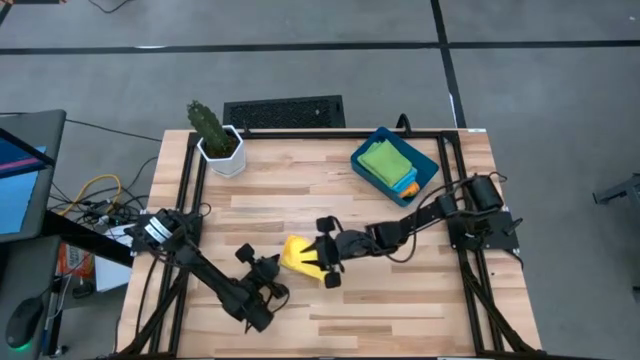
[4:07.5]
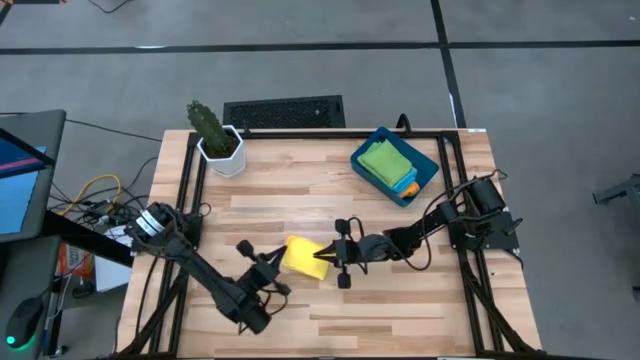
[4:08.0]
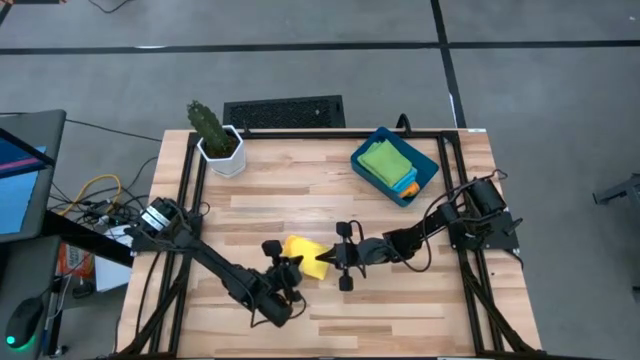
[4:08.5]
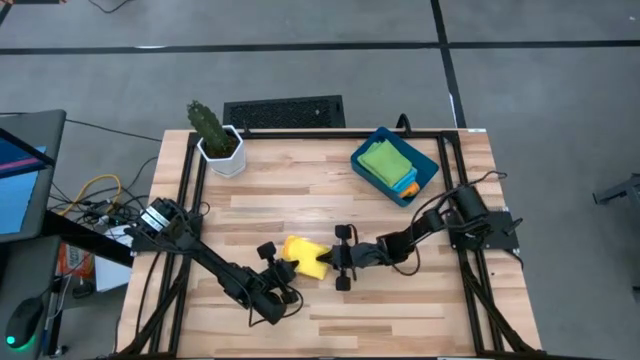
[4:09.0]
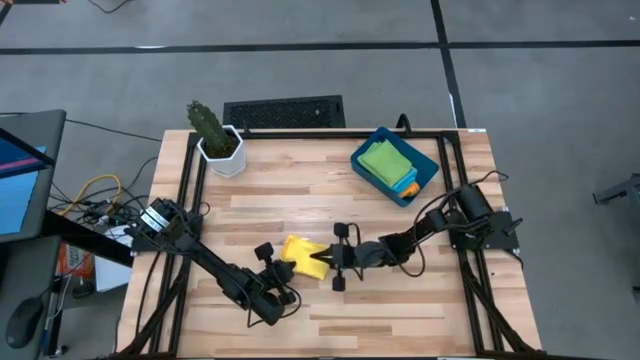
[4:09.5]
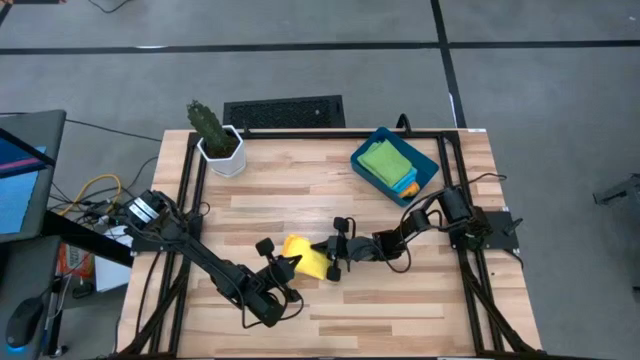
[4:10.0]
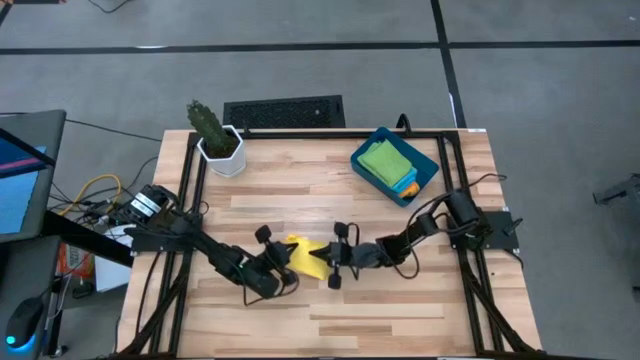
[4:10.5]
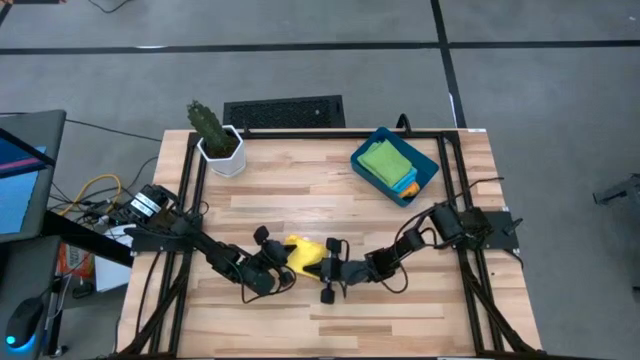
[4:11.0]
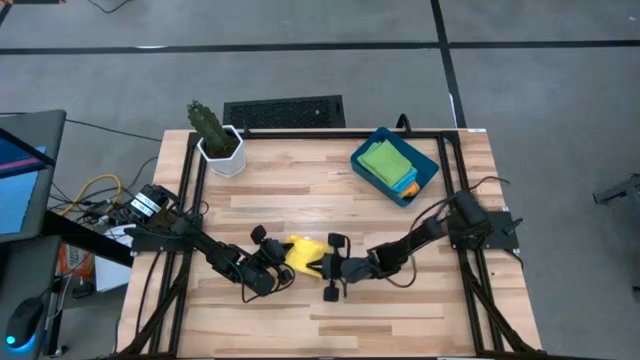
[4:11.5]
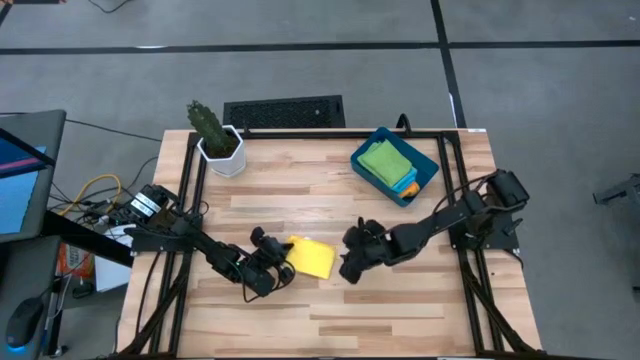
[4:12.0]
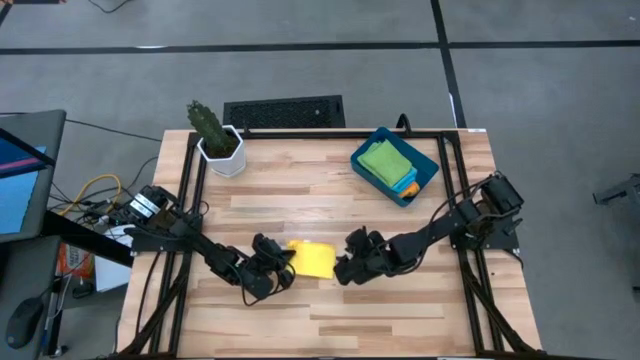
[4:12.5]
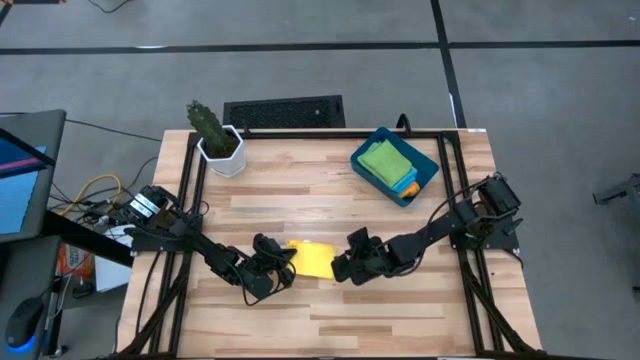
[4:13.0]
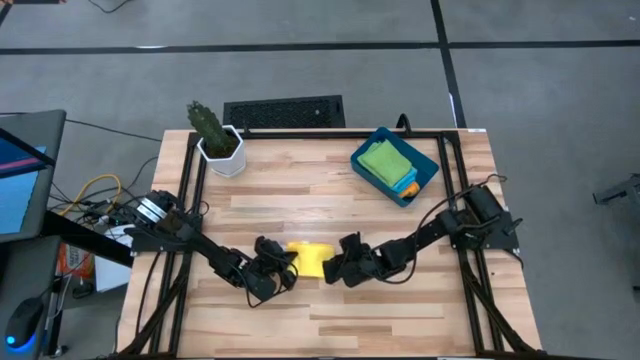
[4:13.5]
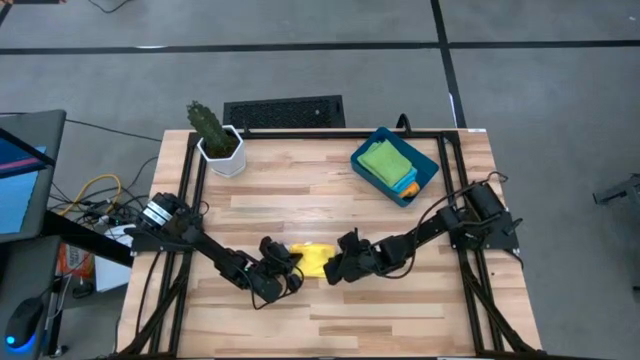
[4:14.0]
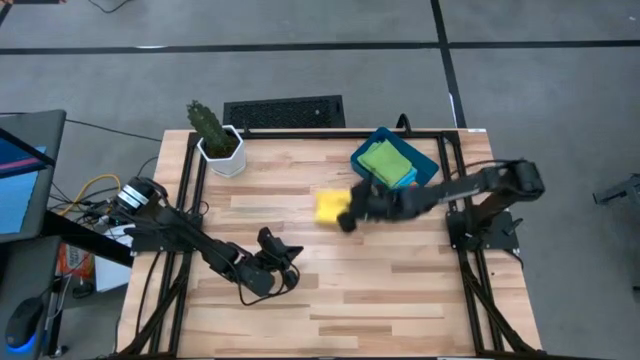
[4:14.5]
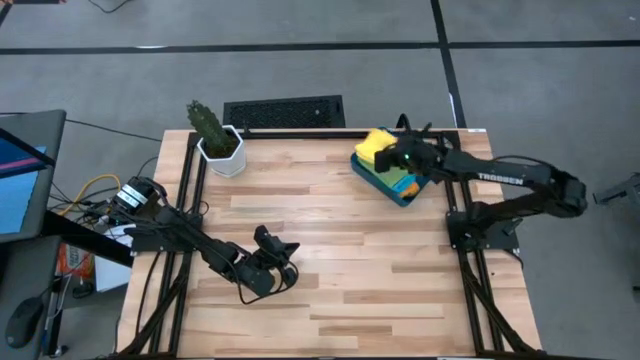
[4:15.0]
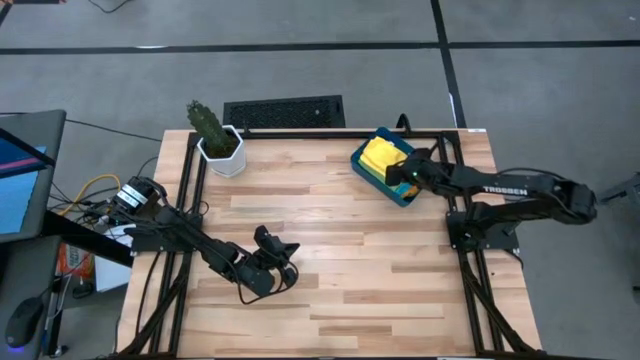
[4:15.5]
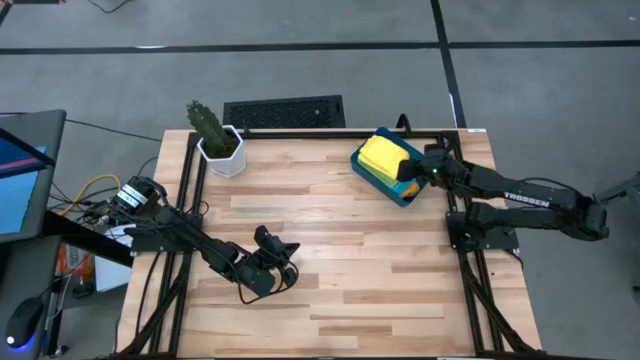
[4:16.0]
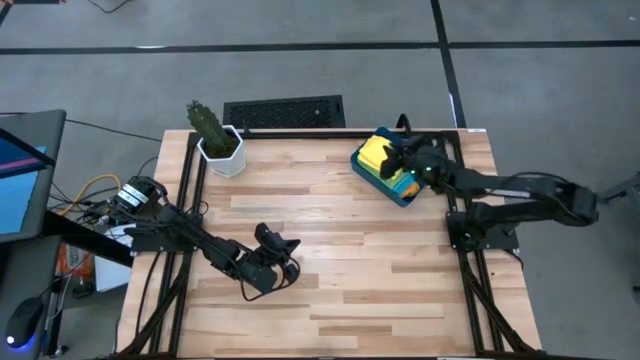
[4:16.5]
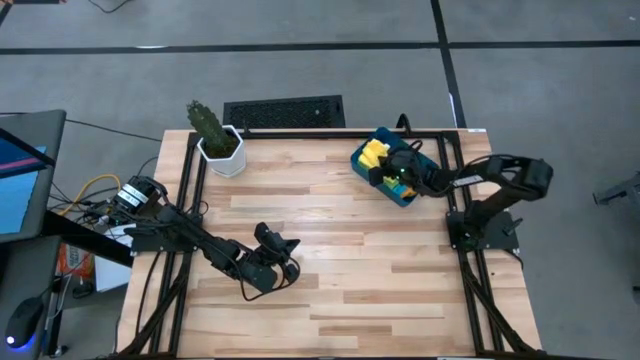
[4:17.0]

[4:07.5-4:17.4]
Task: Fold microfiber towels
Put the folded yellow microfiber towel into the blue bin

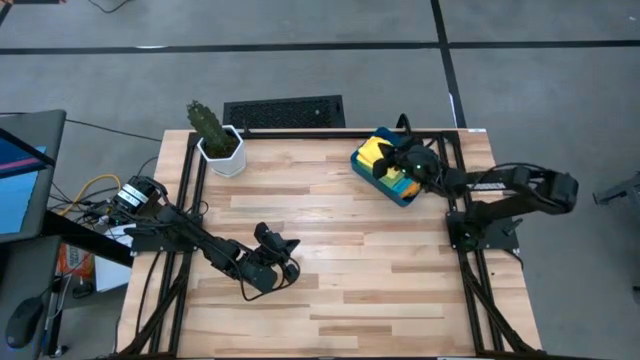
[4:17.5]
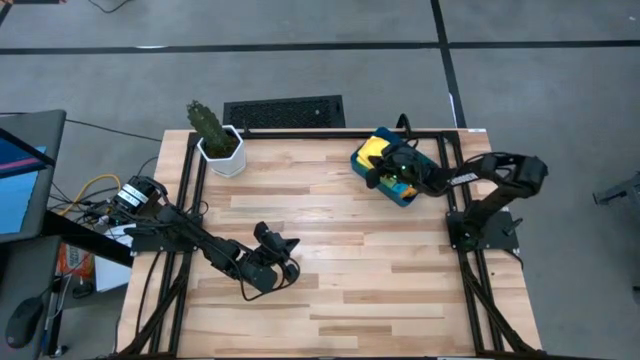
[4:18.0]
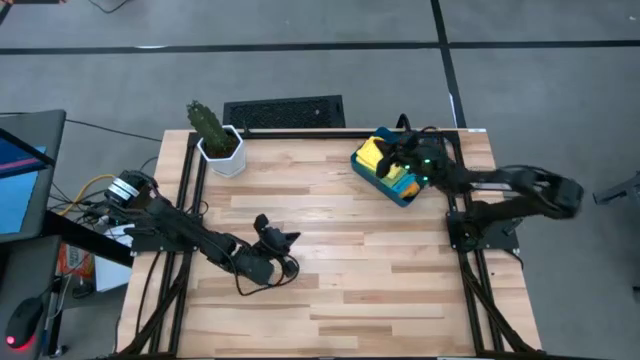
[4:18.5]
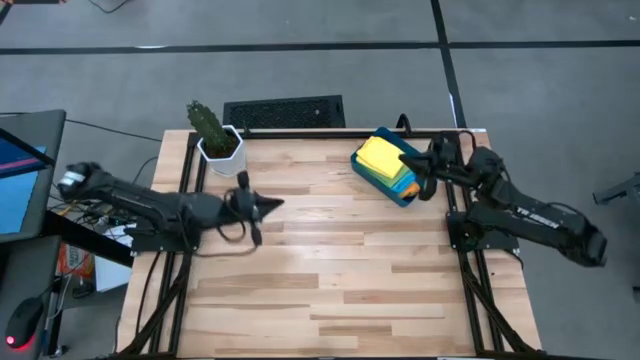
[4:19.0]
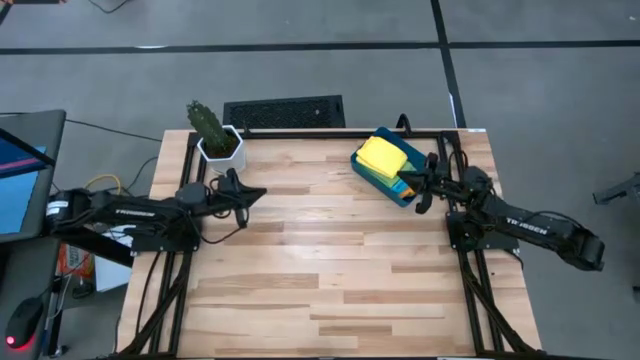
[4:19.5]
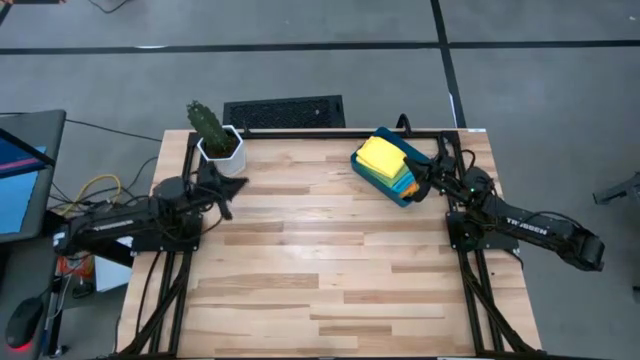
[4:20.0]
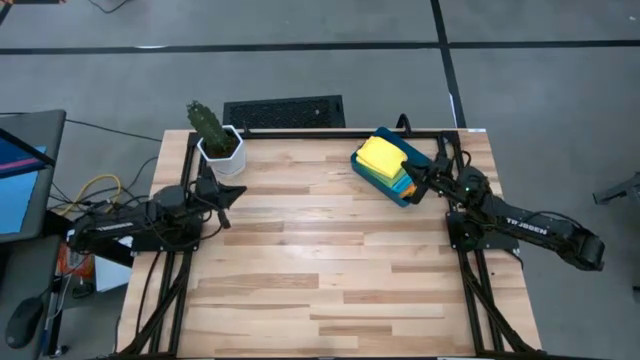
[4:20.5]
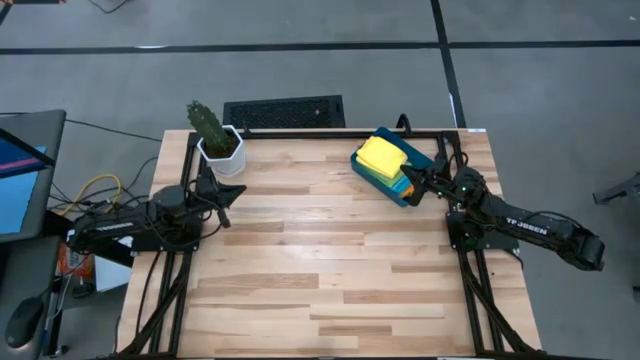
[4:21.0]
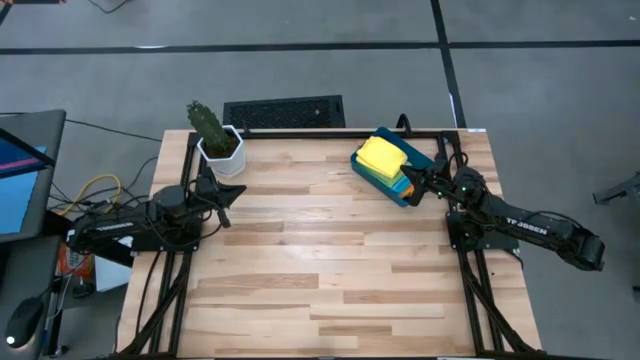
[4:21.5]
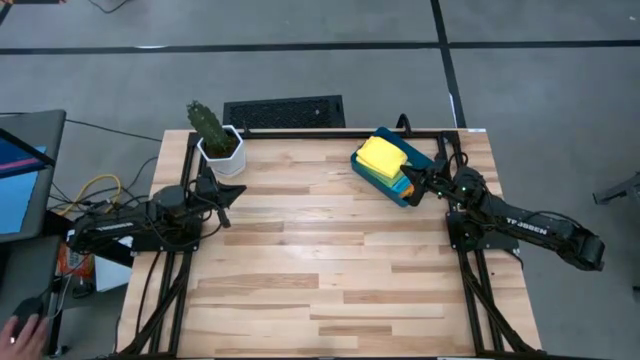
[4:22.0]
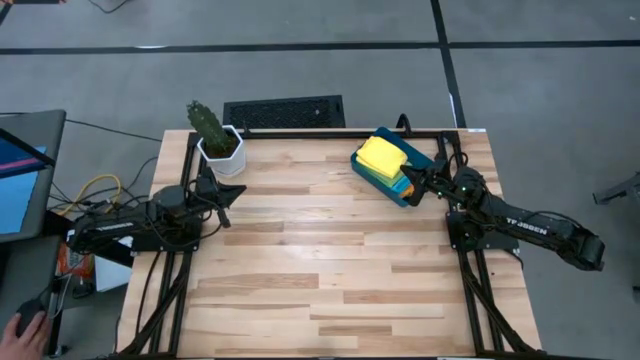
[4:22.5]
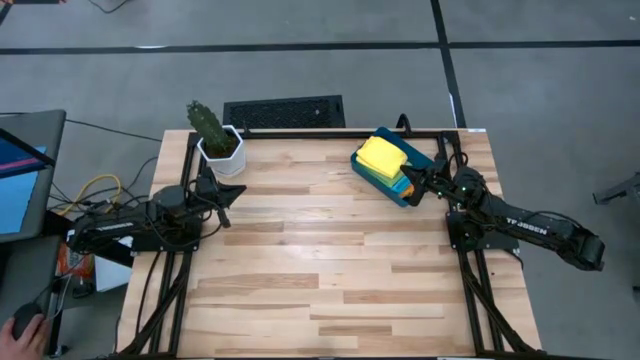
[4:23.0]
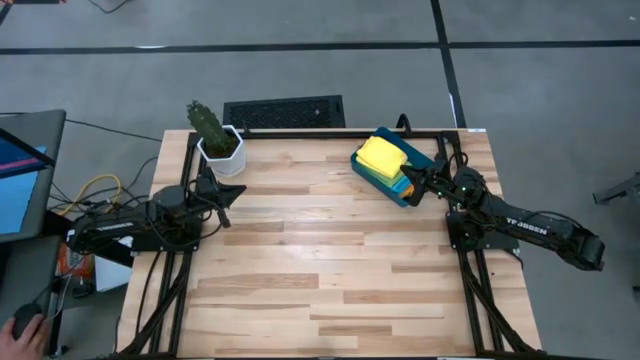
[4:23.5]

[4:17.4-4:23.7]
Return to Home Position

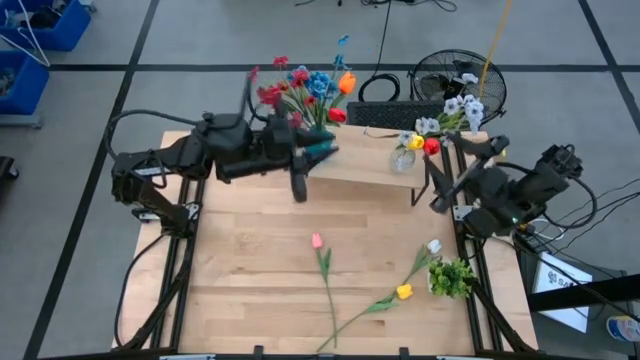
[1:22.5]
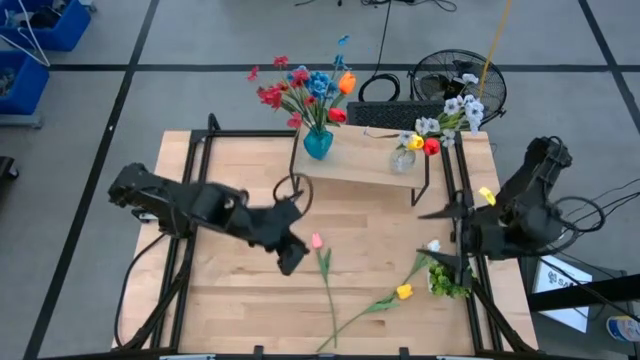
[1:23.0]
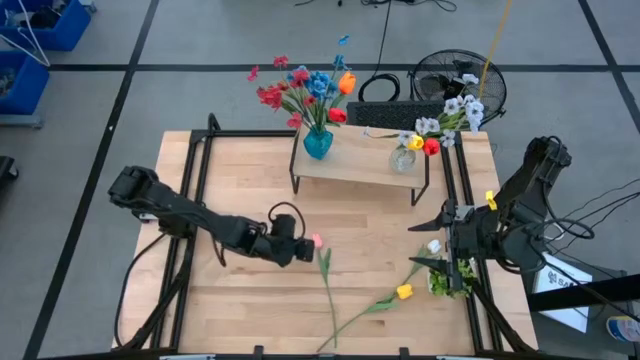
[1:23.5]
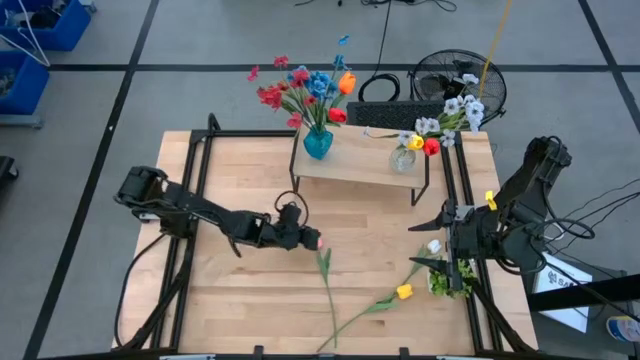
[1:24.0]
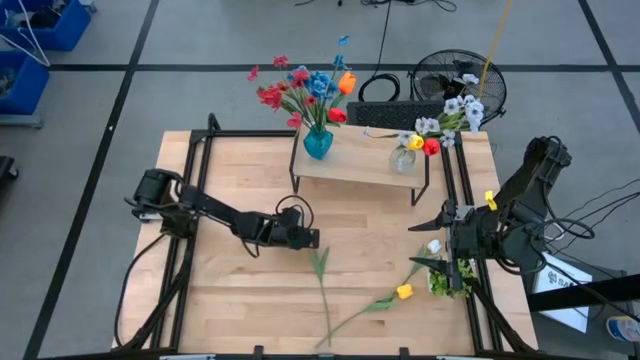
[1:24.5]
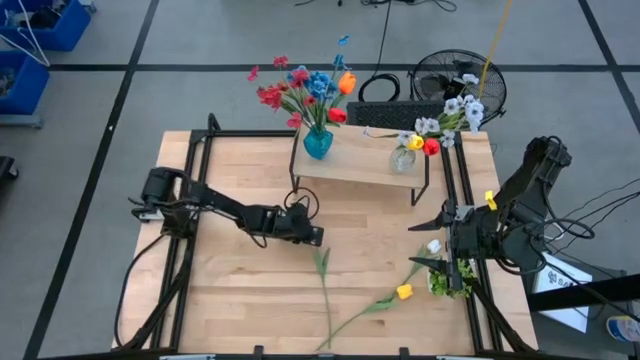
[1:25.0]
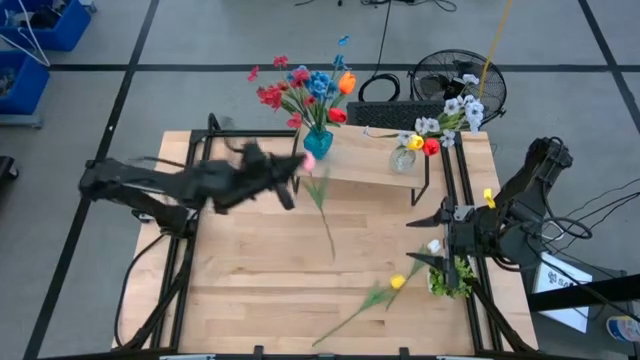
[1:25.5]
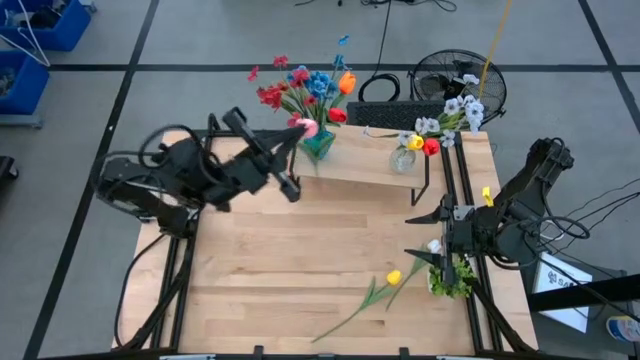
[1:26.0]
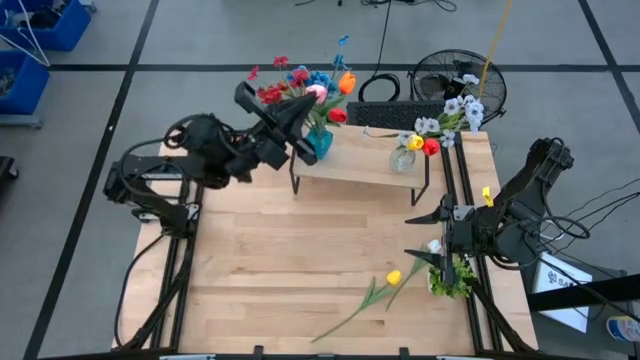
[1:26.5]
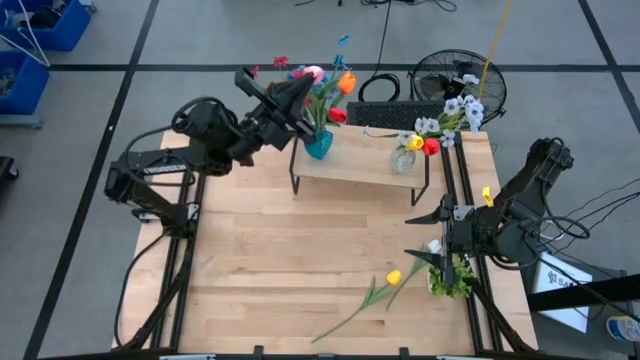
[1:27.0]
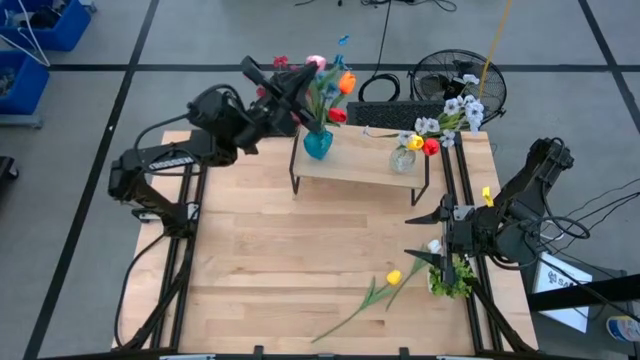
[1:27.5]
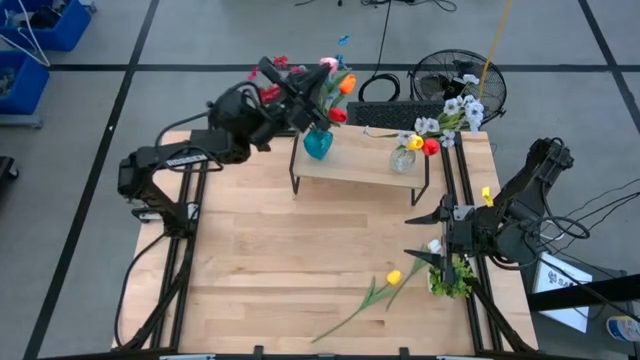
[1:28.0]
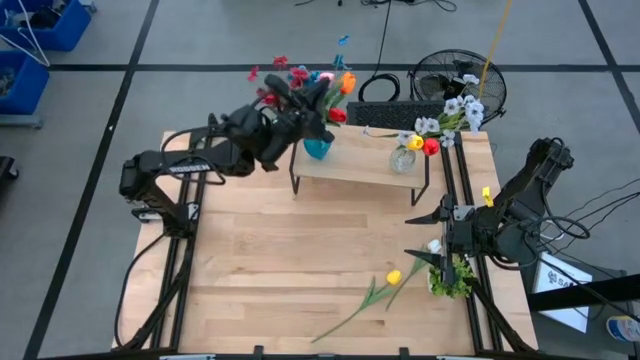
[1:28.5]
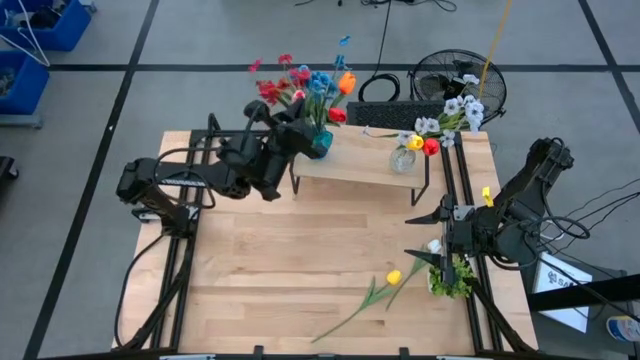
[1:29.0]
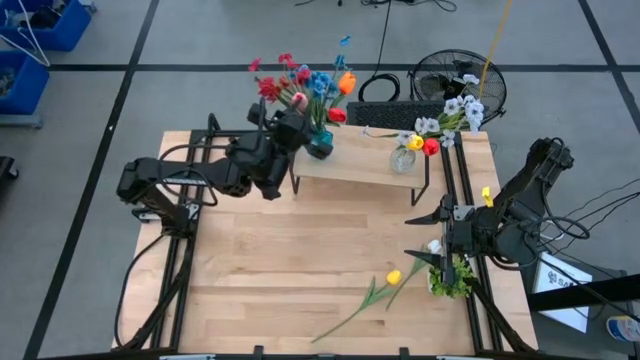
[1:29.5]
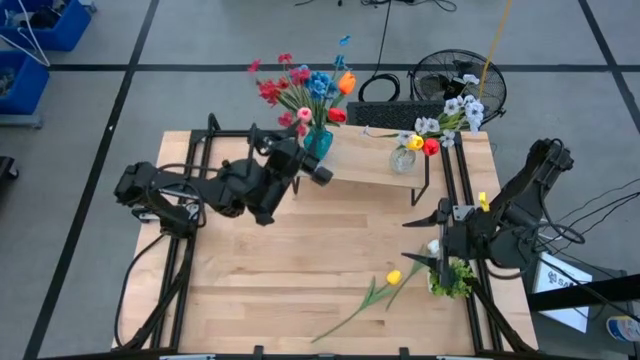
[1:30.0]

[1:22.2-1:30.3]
Task: Pick and place flowers into a vace then onto a shelf
Put the pink tulip into the blue vase on the shelf
